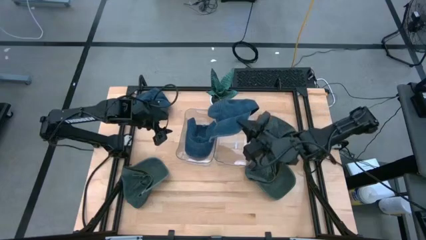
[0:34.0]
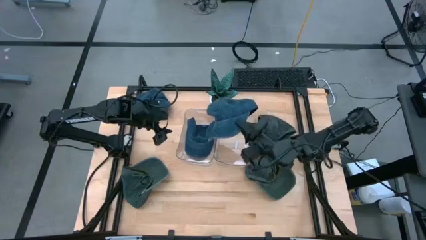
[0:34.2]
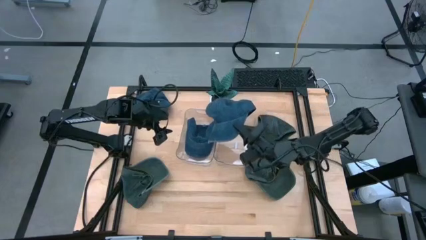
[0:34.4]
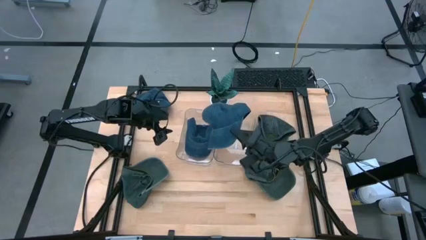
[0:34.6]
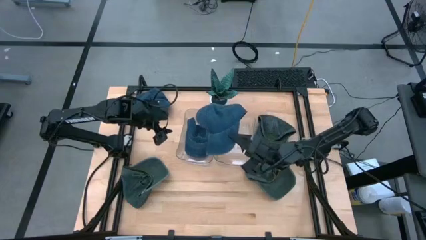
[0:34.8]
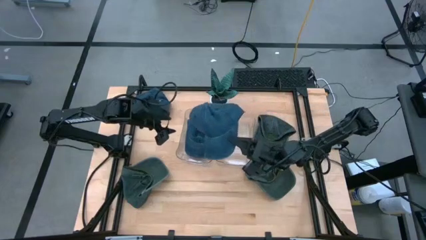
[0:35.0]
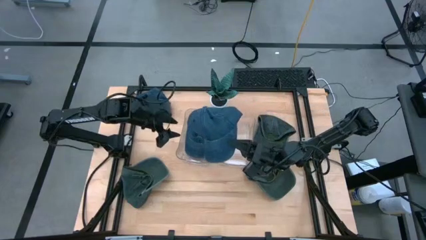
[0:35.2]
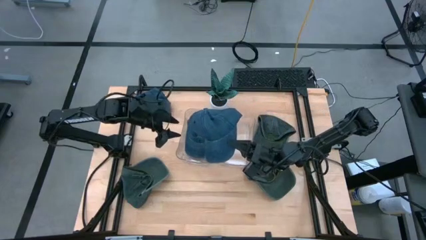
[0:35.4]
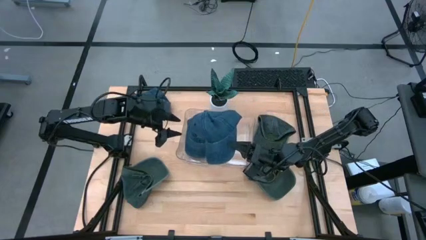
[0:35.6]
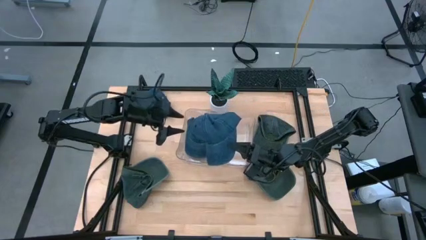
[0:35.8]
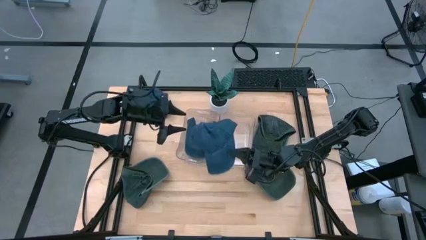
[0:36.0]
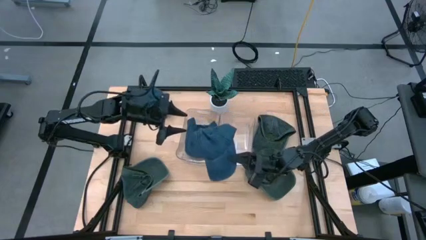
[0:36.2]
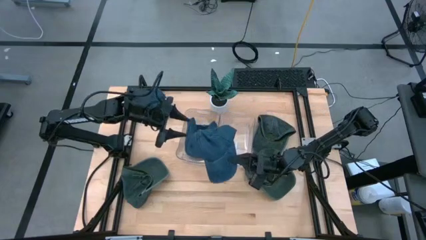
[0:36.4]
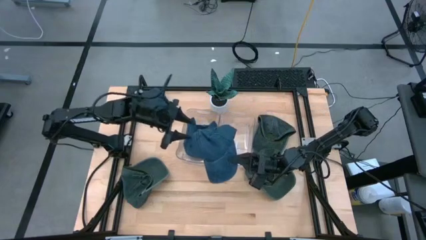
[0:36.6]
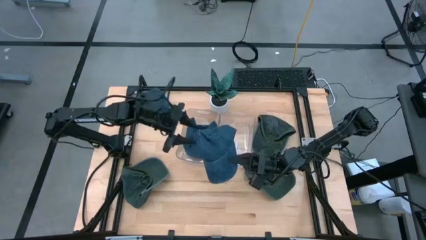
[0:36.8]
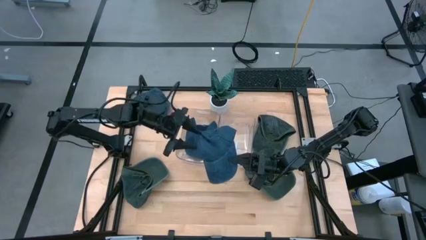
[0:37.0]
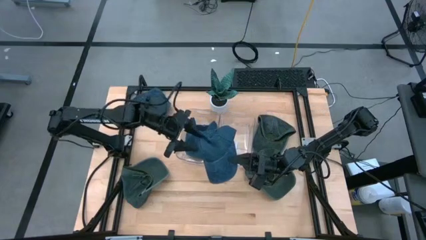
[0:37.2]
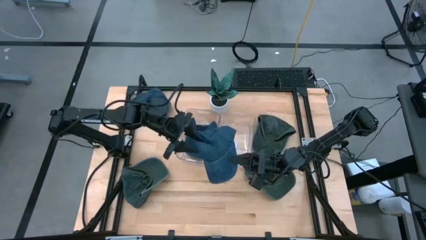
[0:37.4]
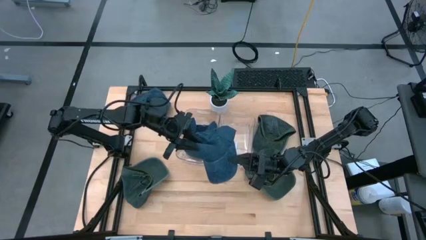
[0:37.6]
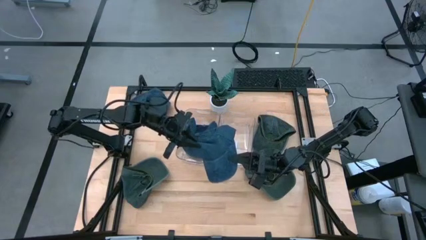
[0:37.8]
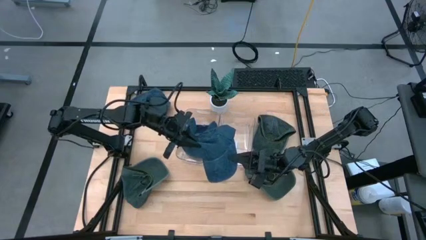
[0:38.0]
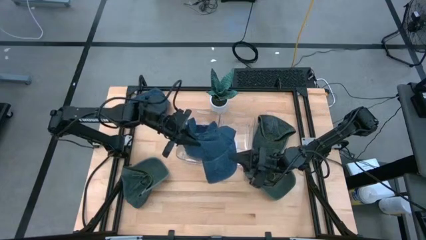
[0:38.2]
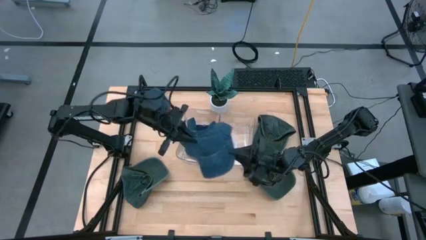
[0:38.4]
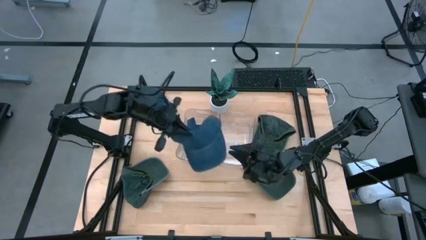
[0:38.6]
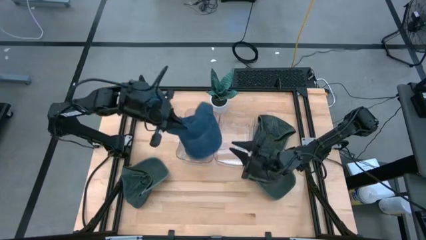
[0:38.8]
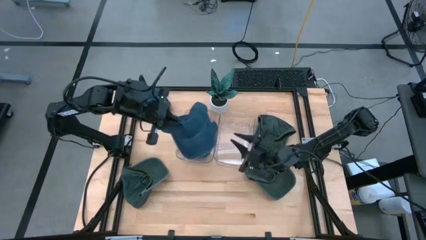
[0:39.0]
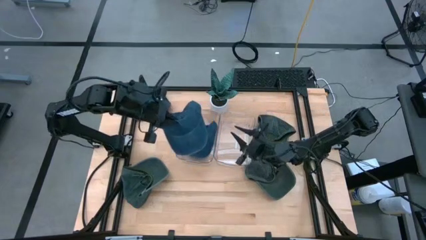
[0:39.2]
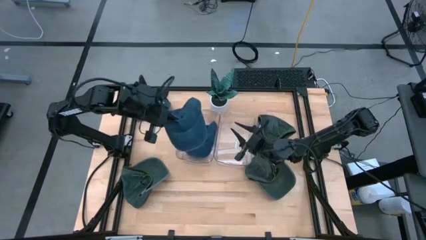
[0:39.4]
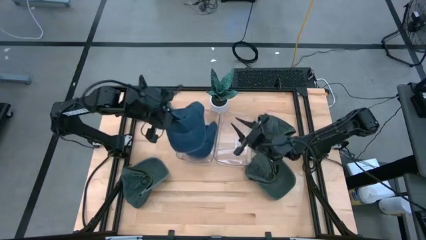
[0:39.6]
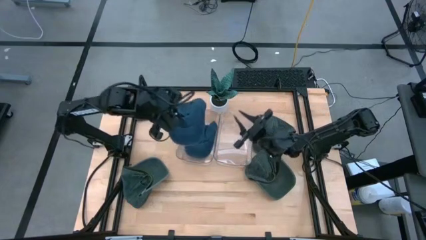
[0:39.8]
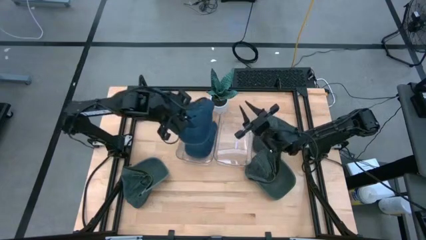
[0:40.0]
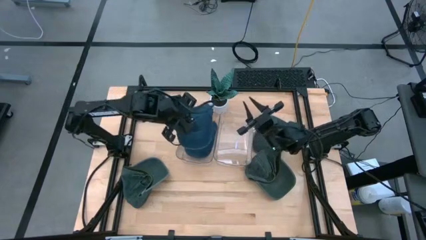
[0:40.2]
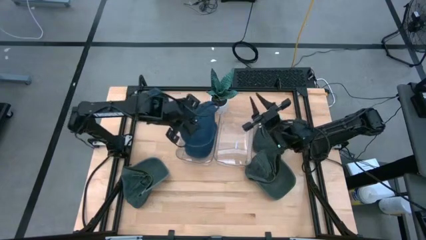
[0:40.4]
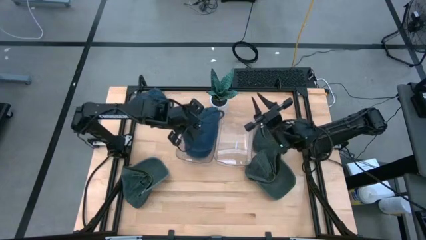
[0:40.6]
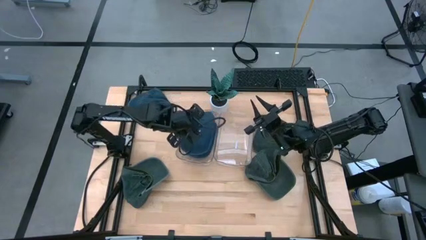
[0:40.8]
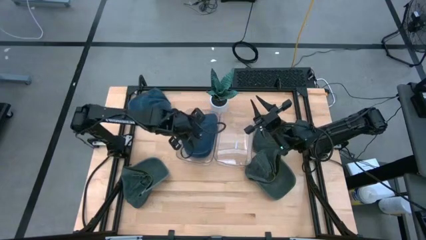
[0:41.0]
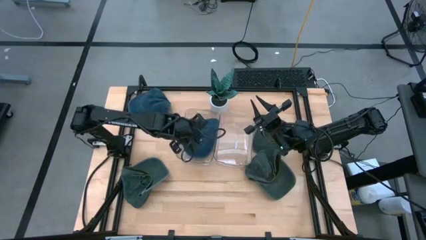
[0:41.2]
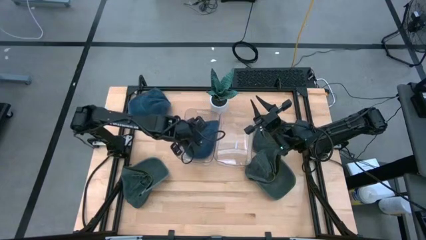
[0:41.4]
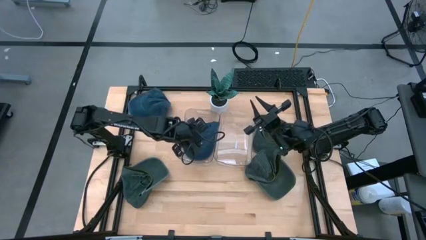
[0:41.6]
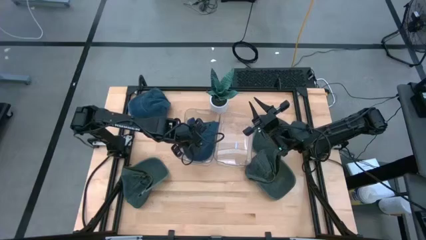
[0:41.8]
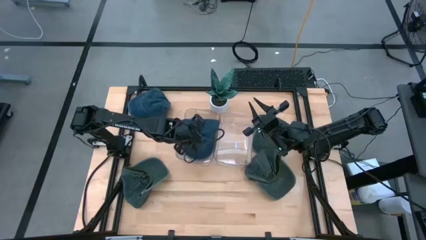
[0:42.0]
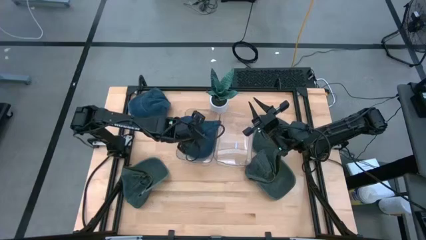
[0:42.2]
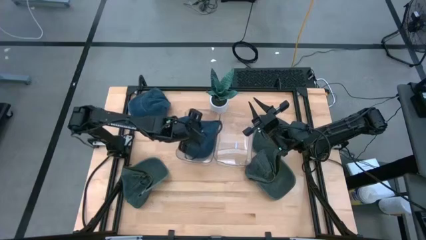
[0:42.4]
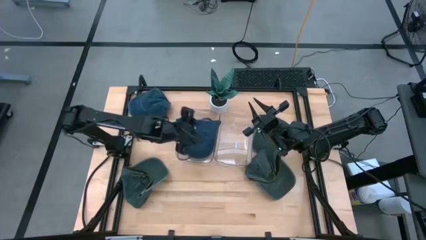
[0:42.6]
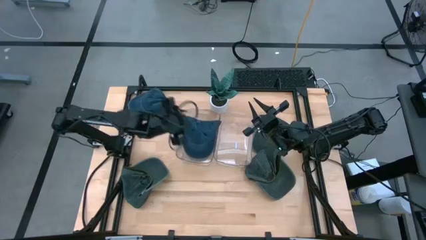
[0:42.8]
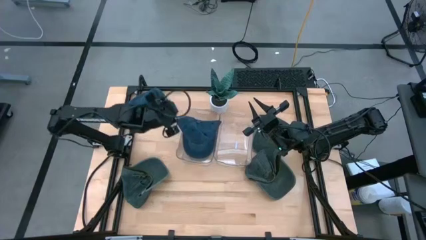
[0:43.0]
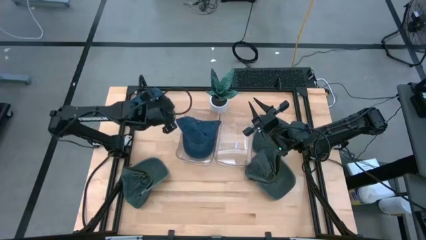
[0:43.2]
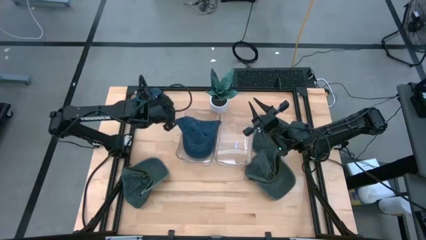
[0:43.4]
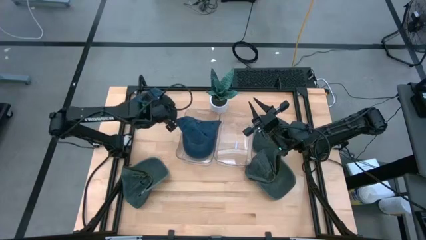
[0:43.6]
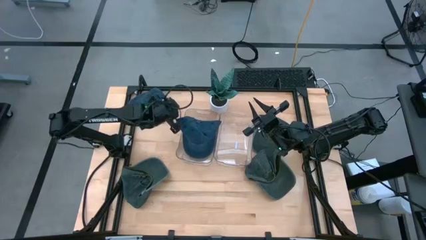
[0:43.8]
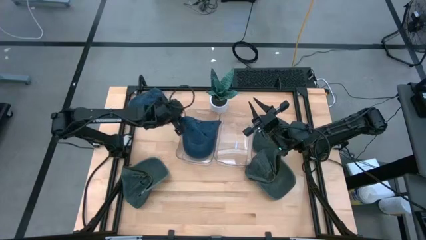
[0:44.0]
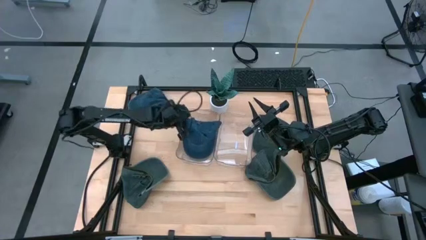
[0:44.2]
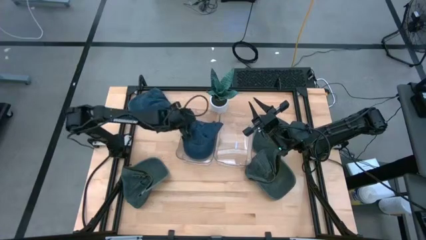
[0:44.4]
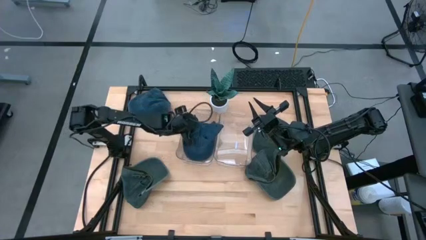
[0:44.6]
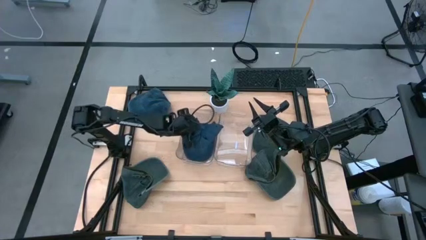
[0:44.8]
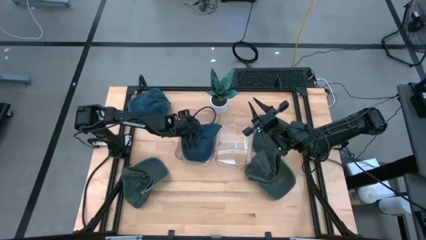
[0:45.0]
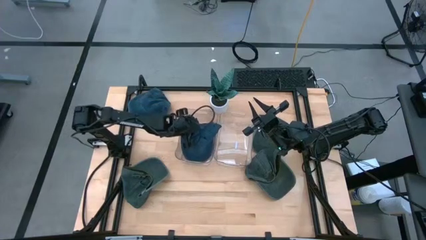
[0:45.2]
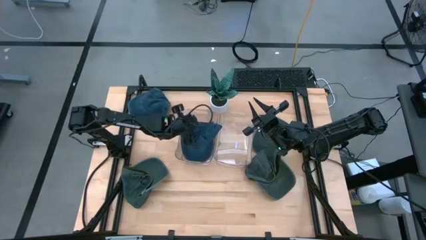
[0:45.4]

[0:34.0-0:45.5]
Task: Pick & Place hat
Put the bottom blue cap into the left transparent bin
